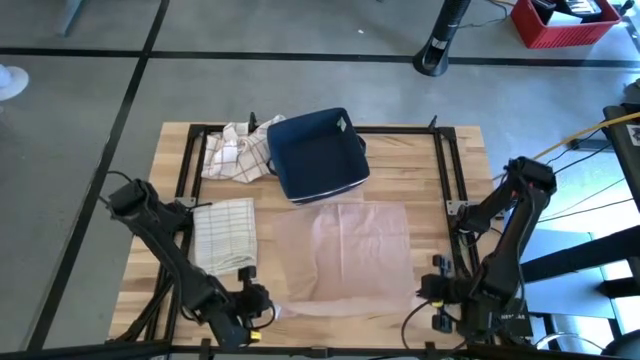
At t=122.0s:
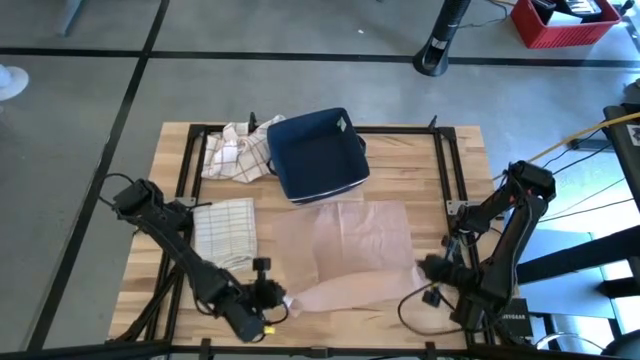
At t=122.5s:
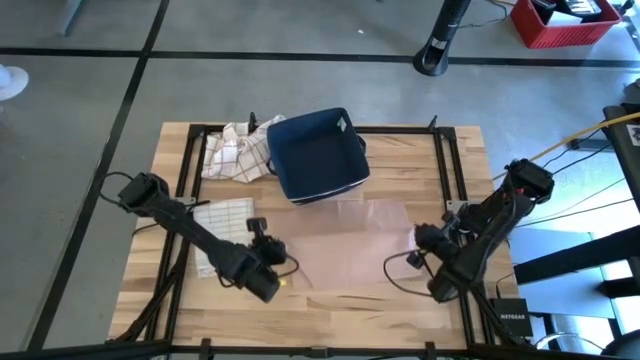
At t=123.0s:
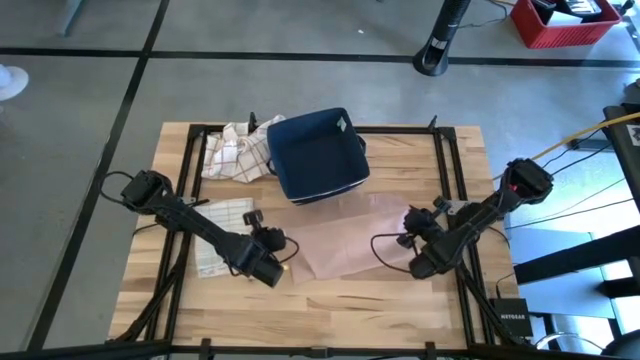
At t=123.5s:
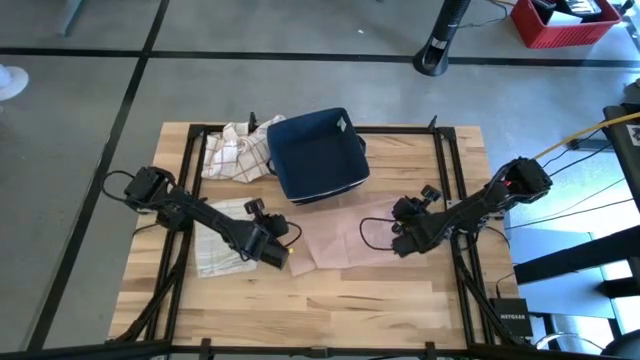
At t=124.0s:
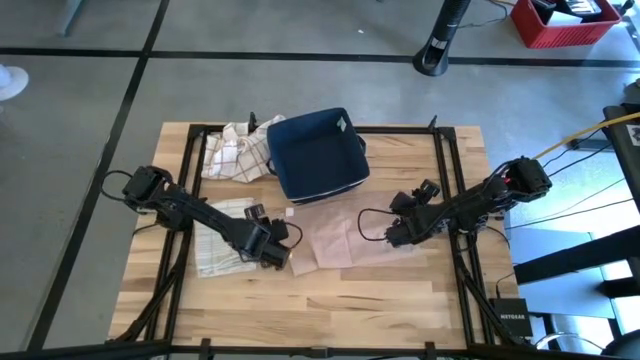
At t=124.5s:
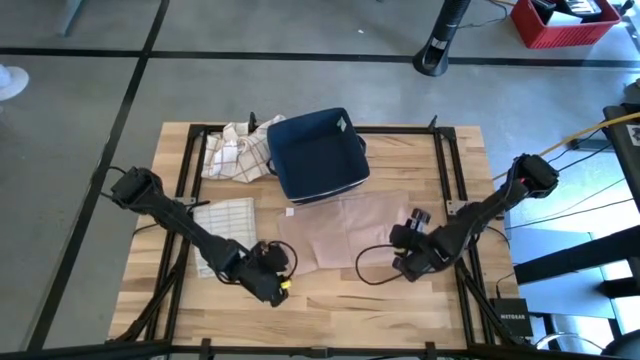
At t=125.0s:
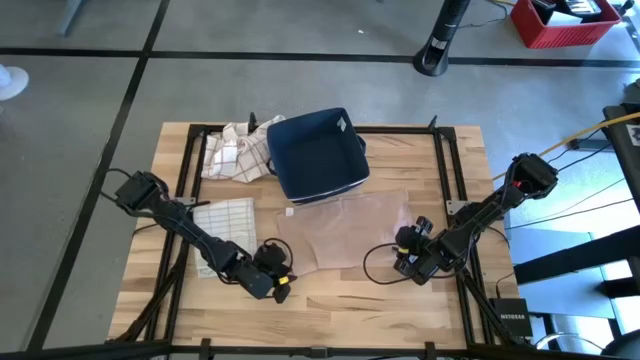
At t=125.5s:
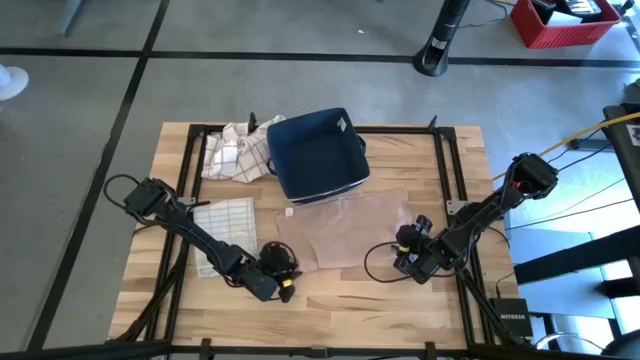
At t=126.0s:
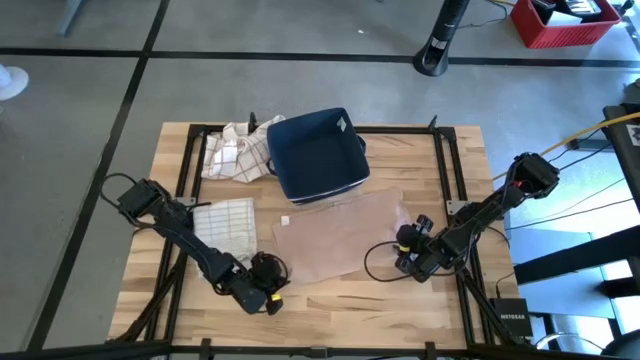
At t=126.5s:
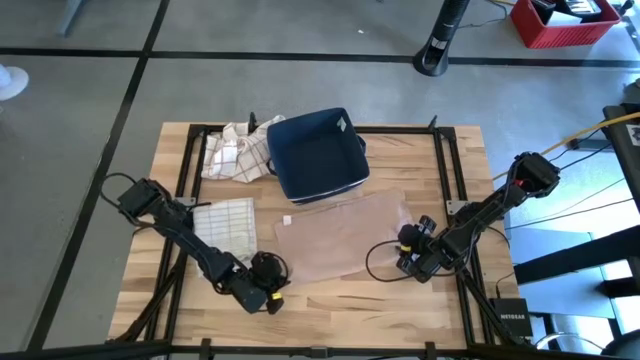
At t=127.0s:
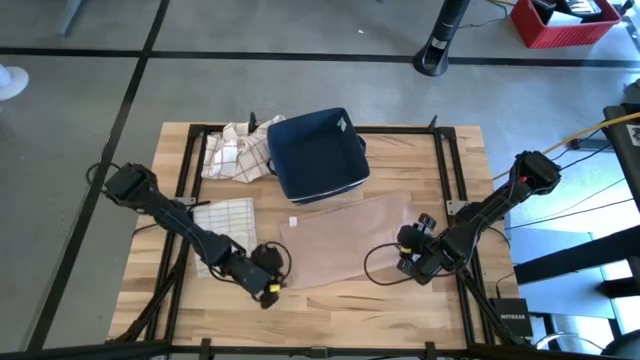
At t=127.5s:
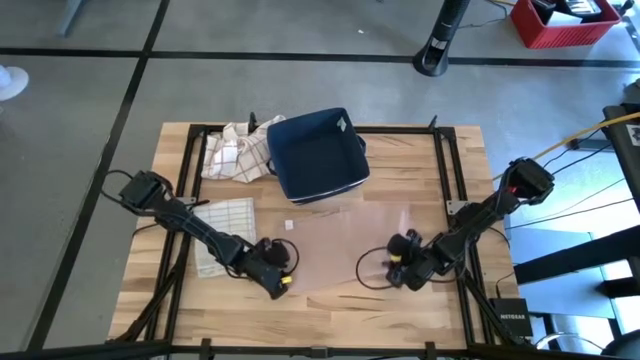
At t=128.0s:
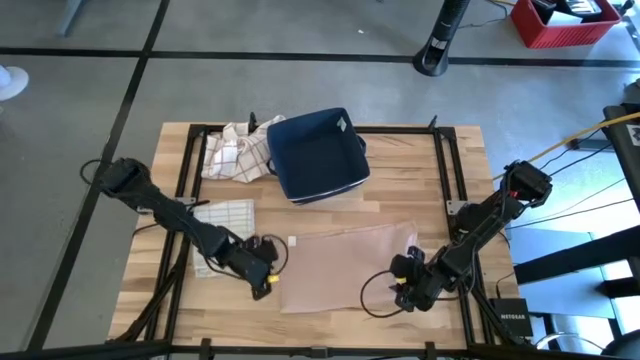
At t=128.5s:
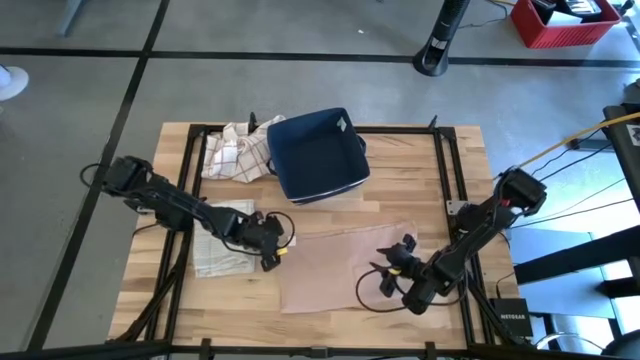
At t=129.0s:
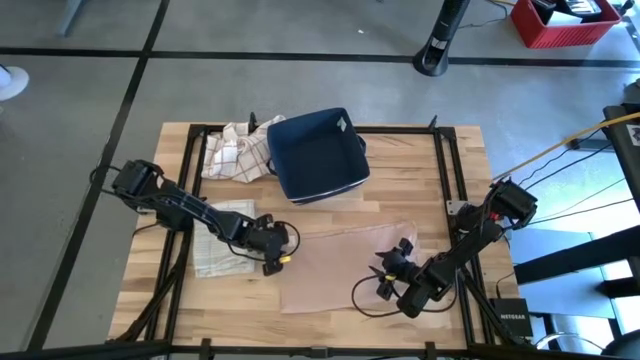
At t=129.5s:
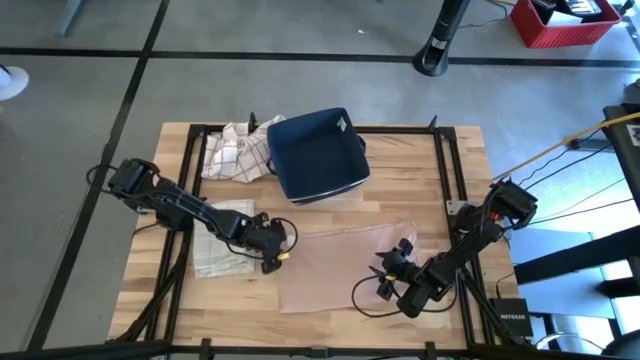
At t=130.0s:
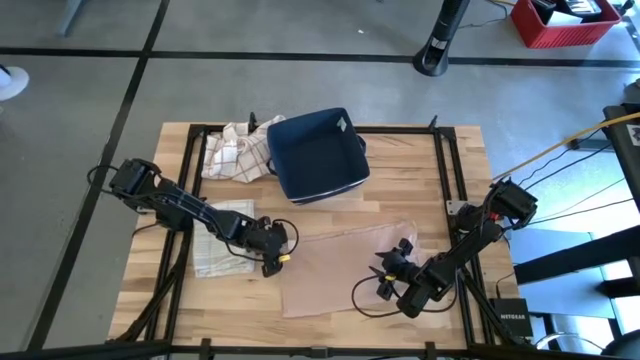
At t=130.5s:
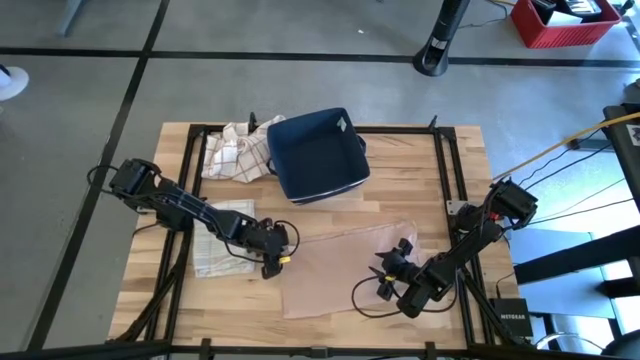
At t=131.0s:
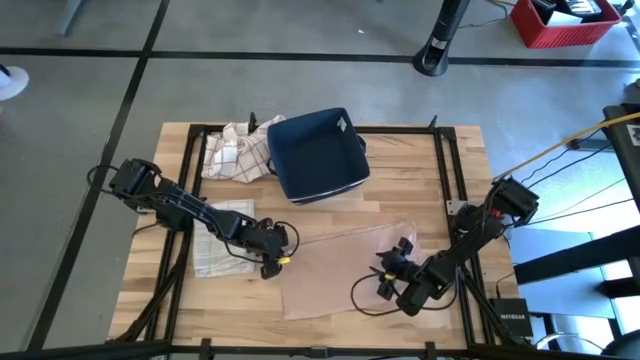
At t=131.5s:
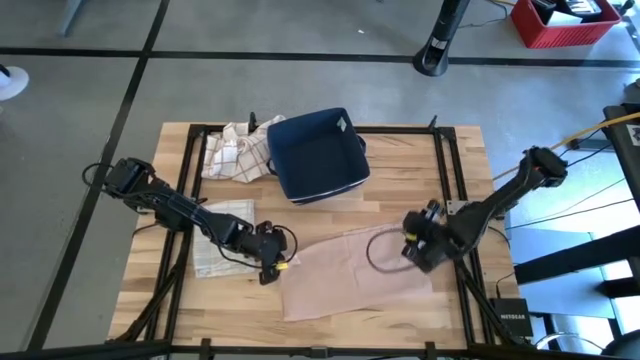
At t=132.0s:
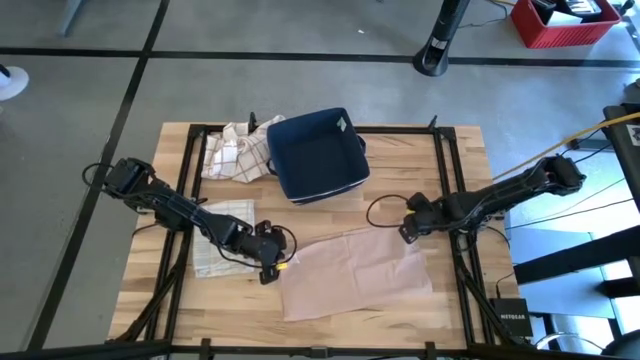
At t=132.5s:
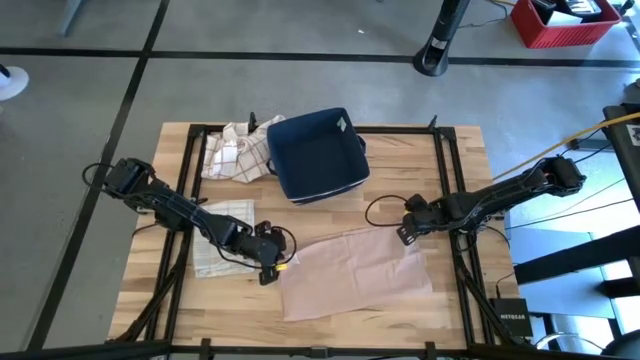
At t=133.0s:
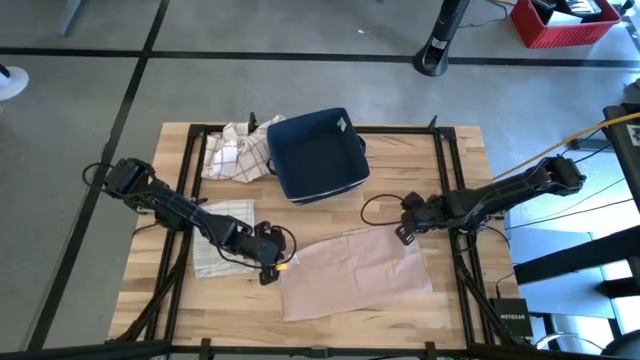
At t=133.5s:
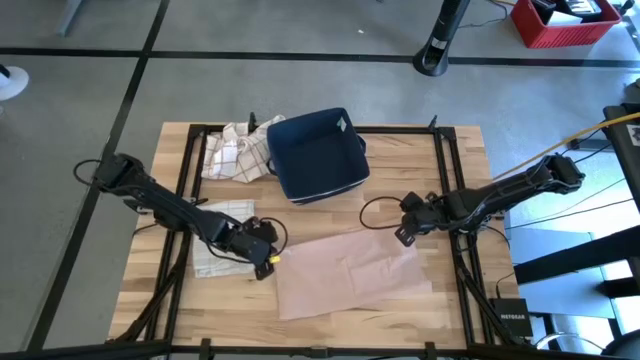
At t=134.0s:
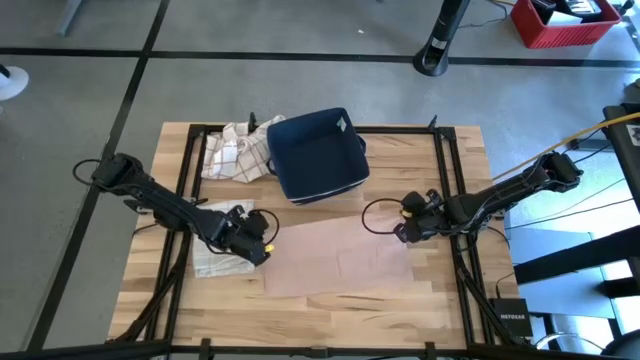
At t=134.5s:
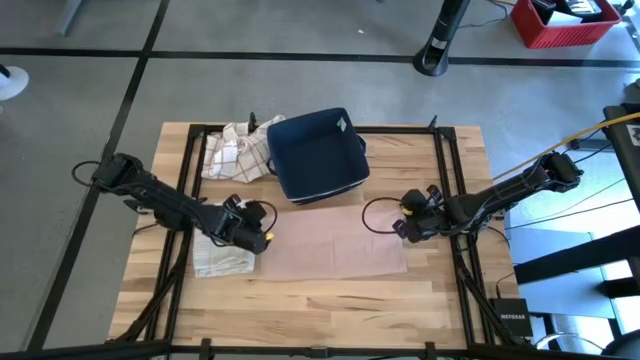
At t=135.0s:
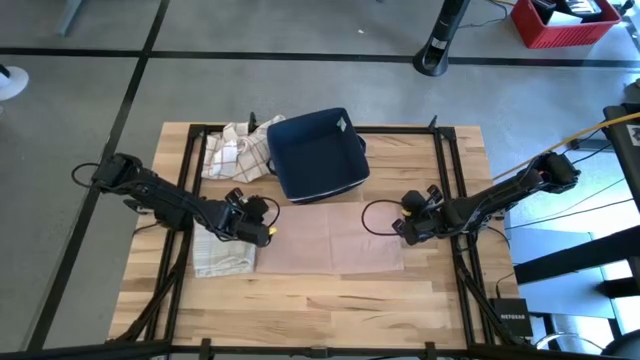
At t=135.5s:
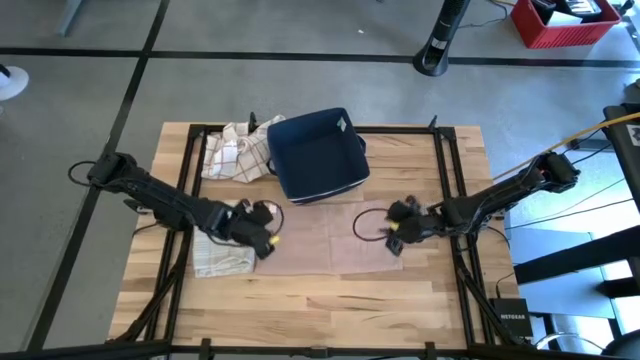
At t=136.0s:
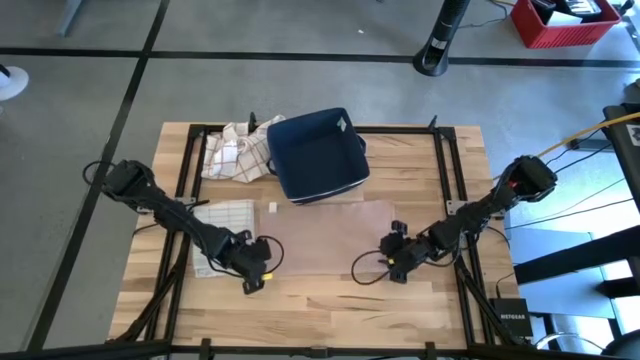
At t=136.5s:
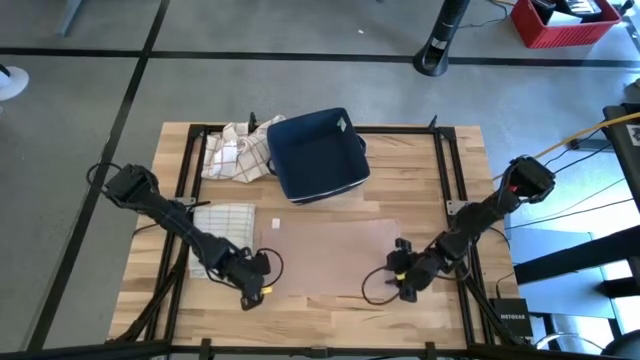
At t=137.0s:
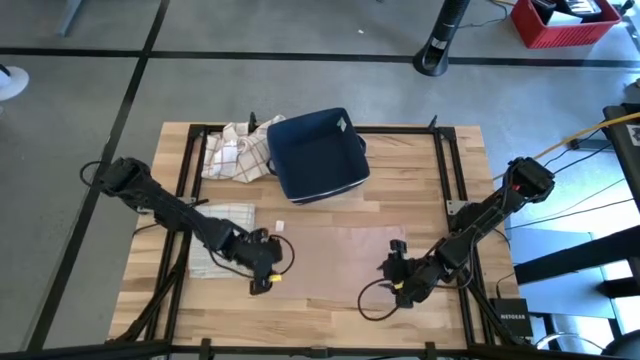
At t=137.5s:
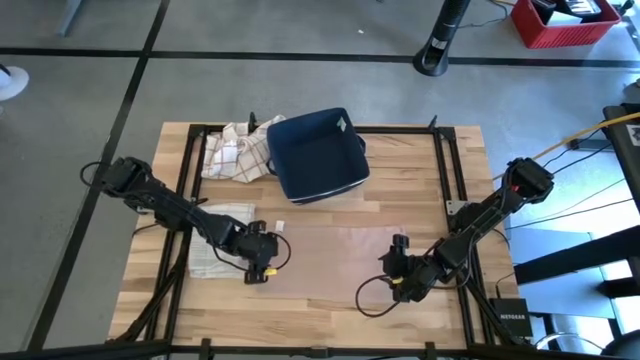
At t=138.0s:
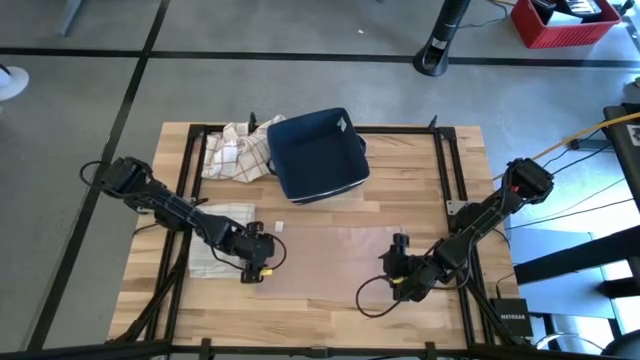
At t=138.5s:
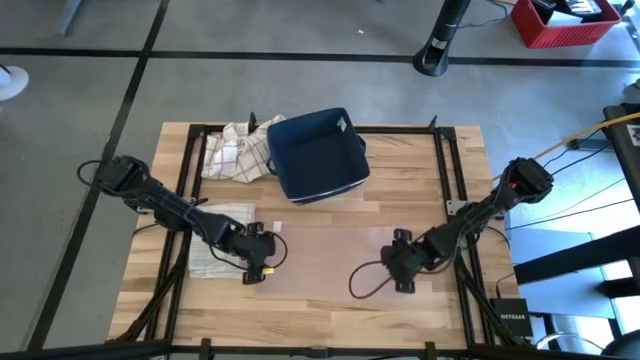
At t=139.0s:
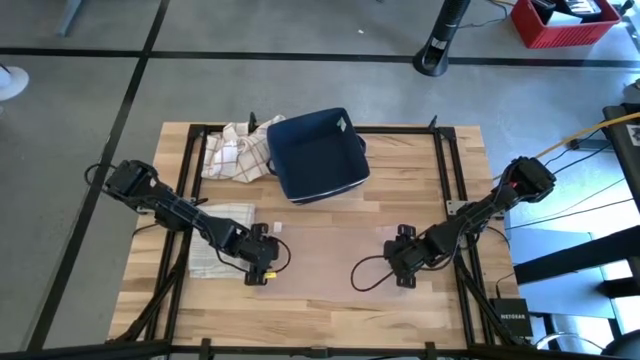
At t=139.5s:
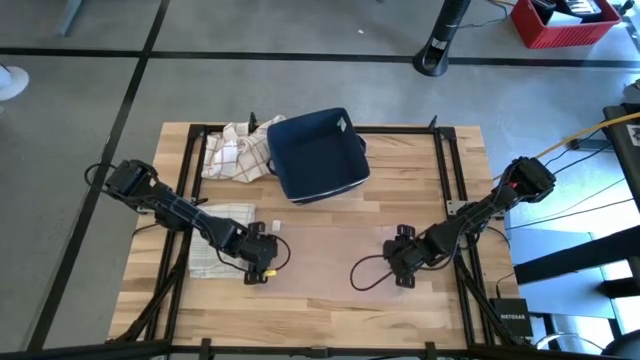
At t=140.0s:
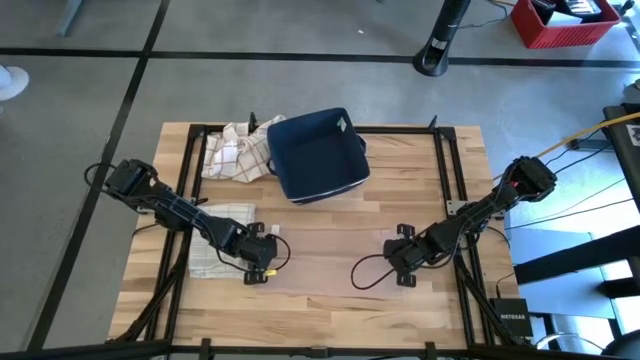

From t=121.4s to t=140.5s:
Task: Fold towel
Fold the pink towel on the table
